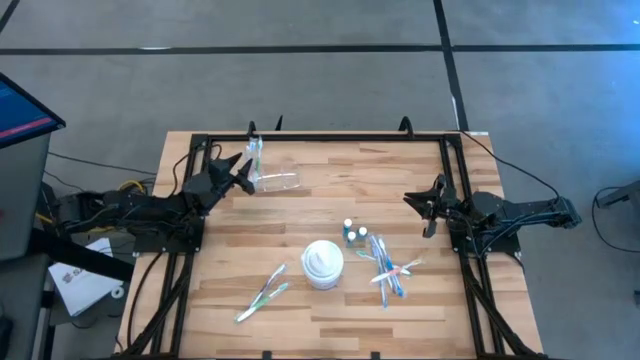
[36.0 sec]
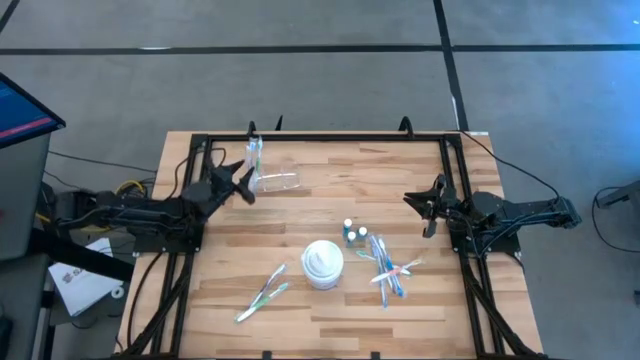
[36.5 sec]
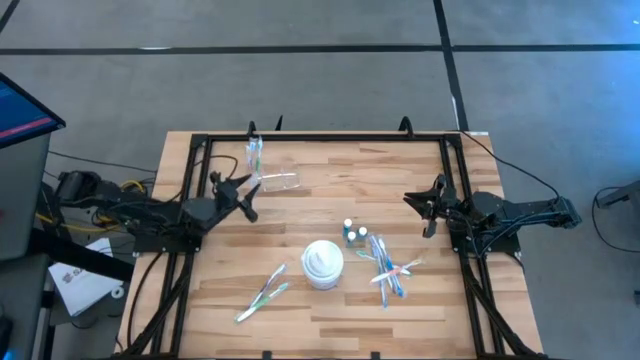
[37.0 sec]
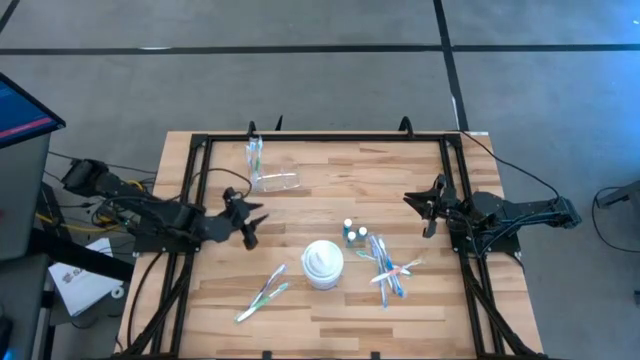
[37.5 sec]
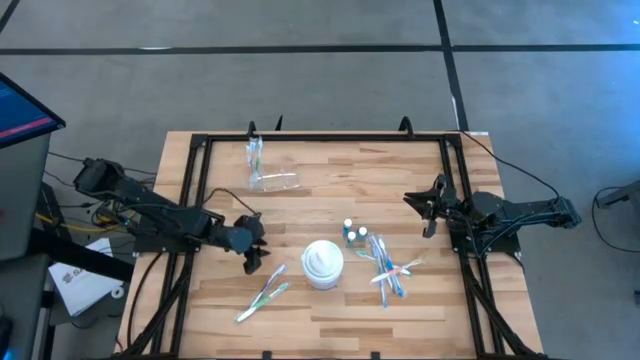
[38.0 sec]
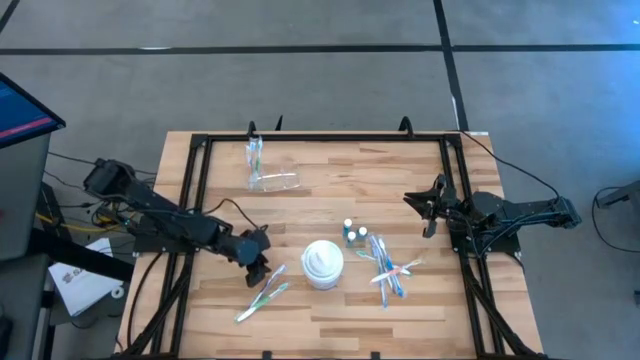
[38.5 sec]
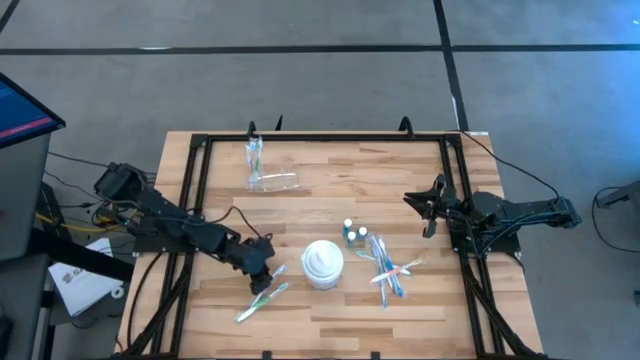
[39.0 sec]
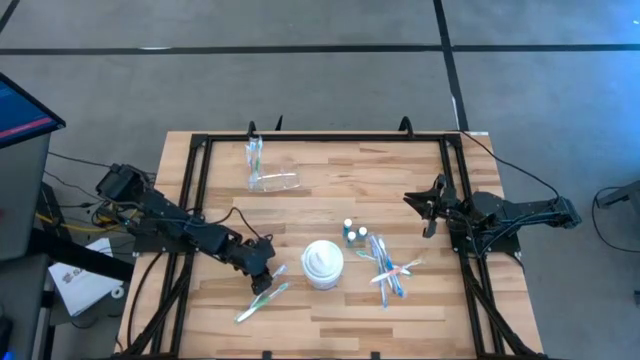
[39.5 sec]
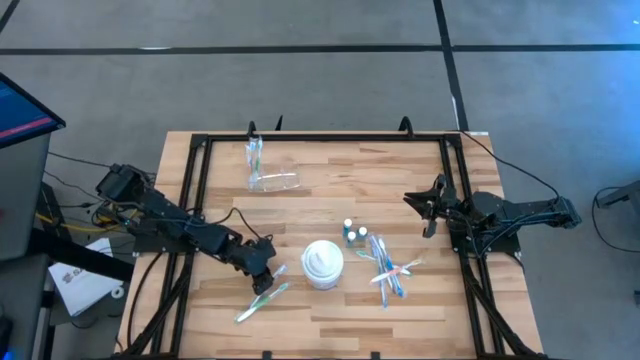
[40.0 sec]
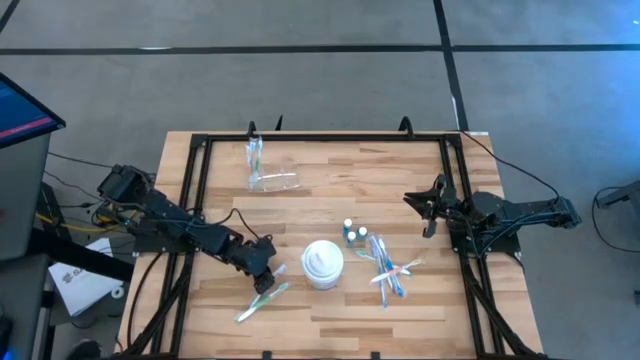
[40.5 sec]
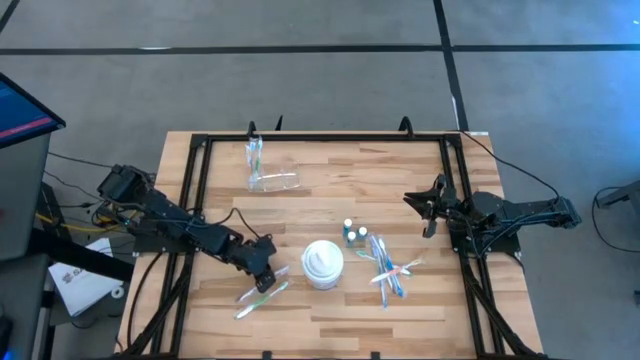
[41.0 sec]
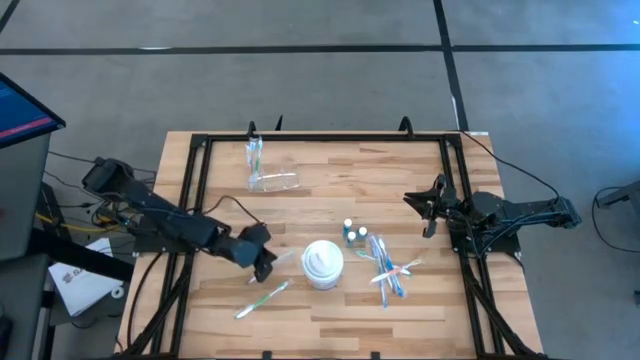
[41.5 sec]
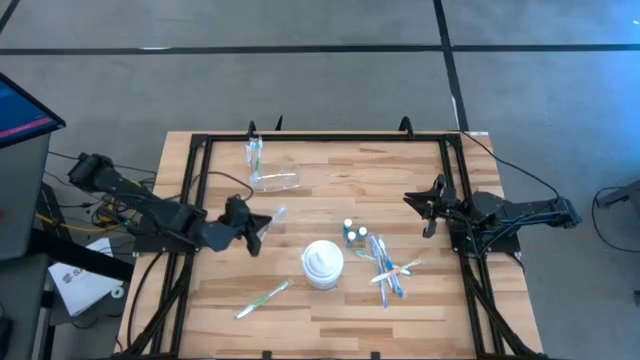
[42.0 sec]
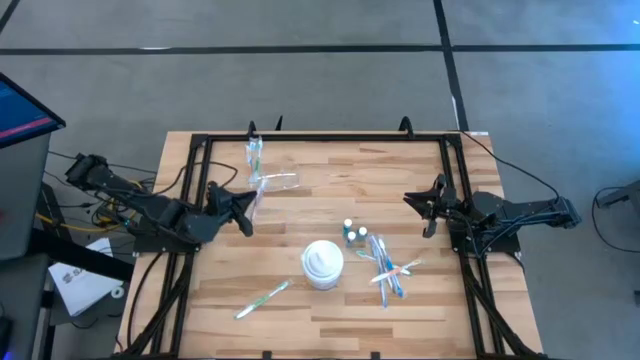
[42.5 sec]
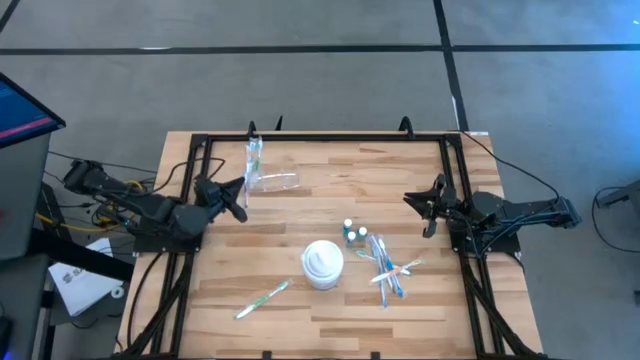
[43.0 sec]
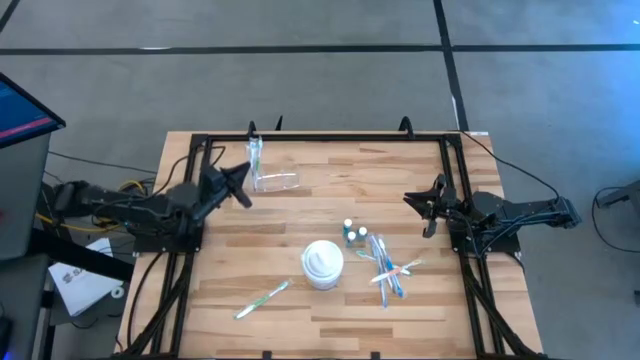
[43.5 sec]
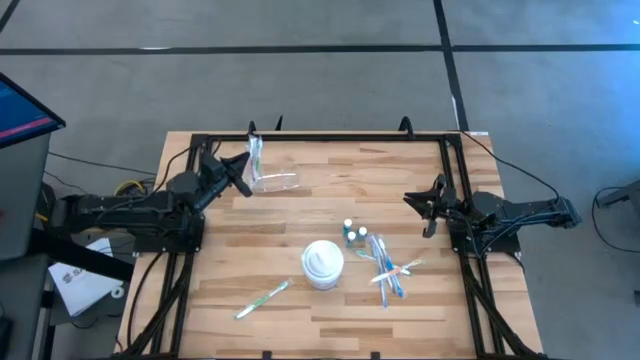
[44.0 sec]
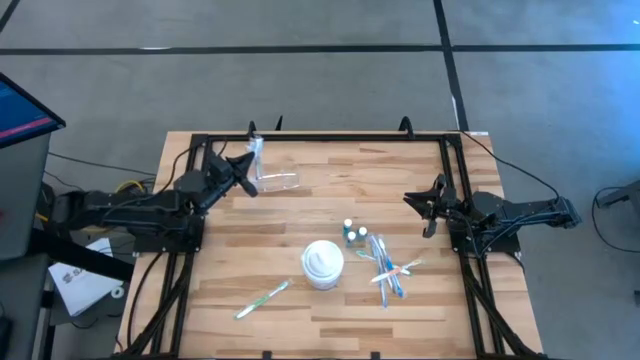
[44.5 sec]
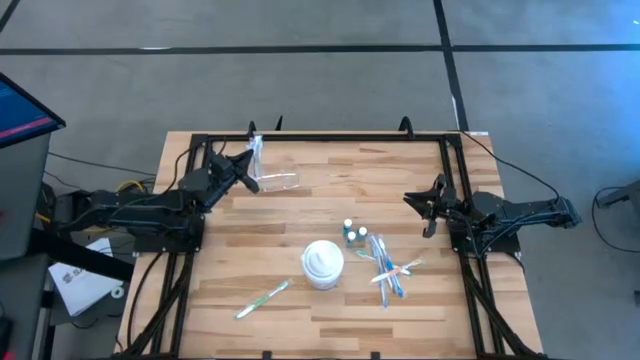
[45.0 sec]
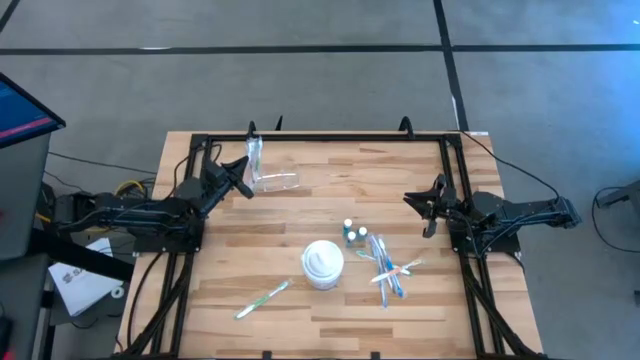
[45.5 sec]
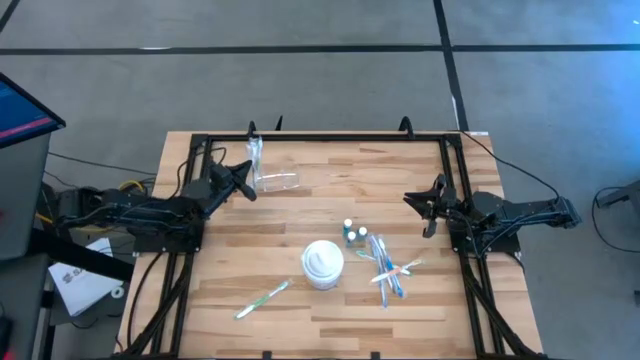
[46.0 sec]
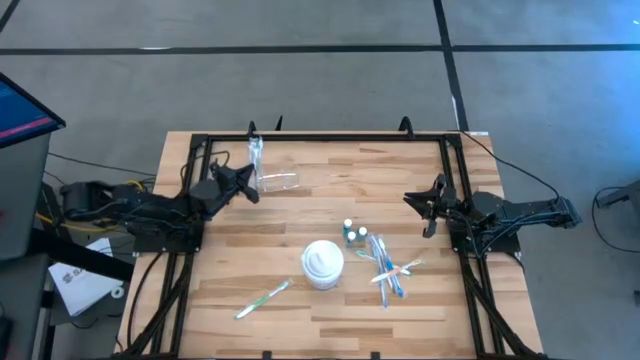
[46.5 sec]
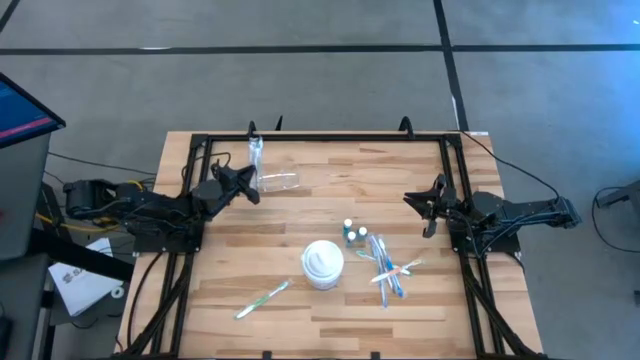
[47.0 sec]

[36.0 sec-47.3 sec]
Task: Pick & Place toothbrushing station
Put the left purple toothbrush into the transparent organizer

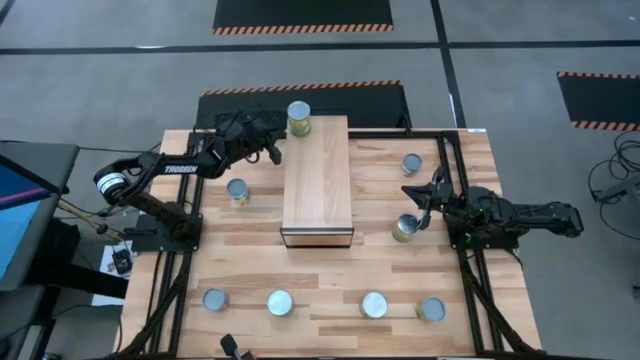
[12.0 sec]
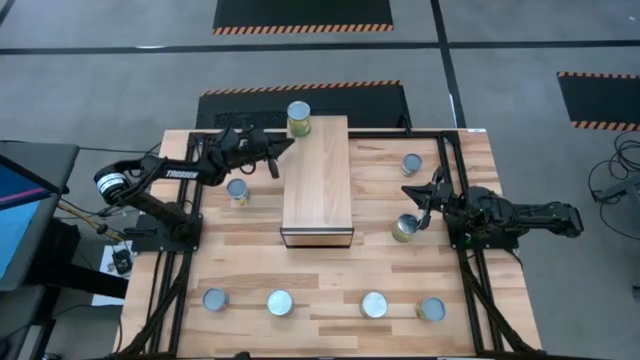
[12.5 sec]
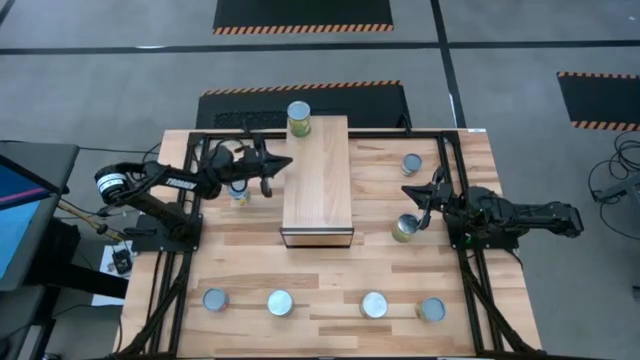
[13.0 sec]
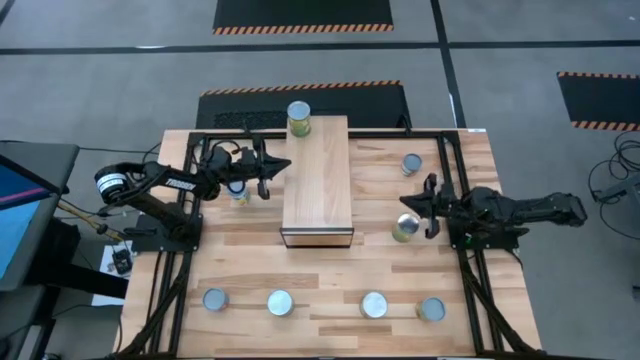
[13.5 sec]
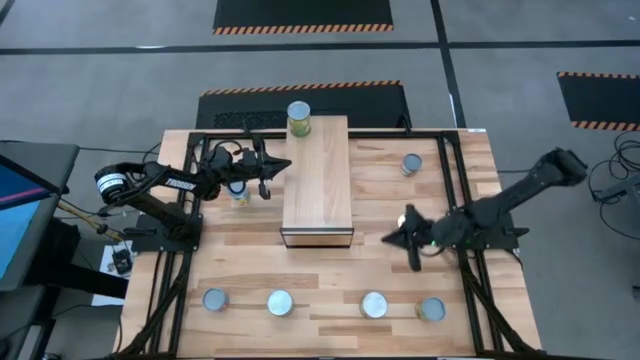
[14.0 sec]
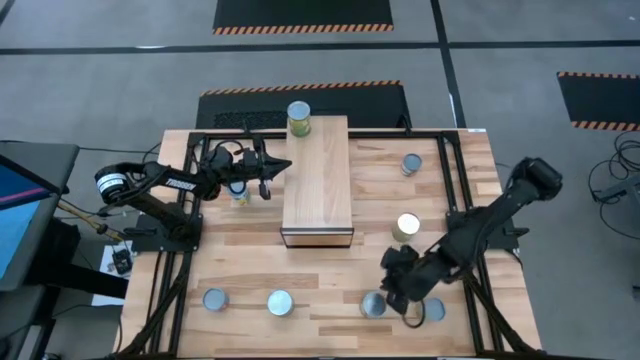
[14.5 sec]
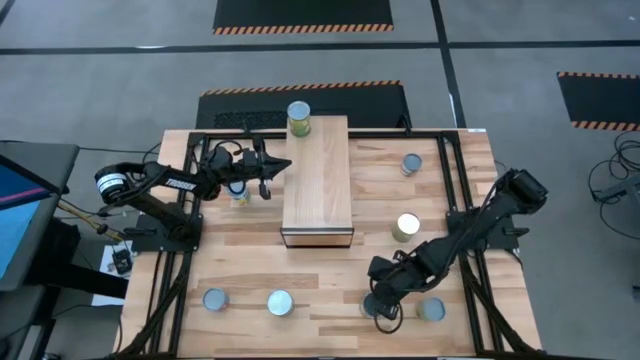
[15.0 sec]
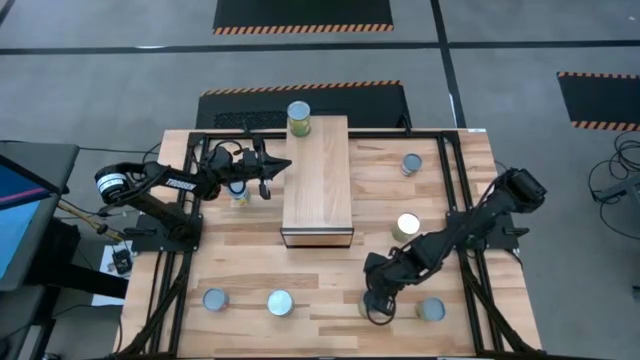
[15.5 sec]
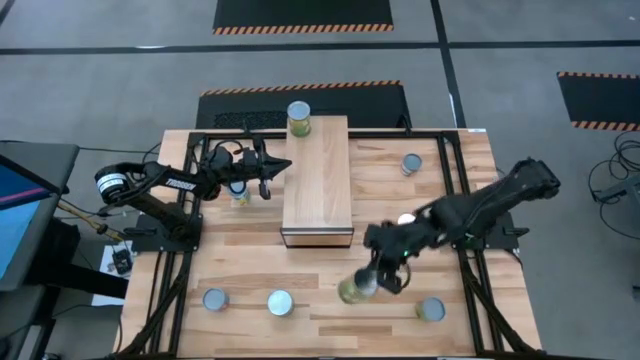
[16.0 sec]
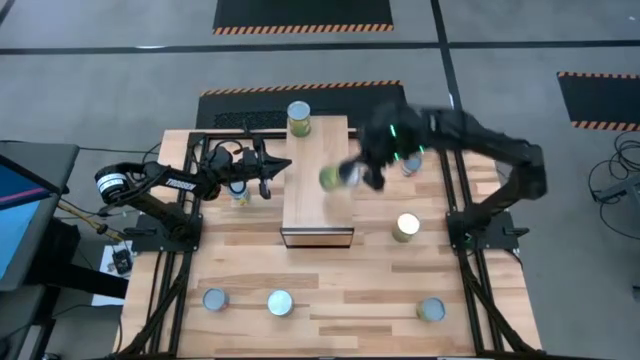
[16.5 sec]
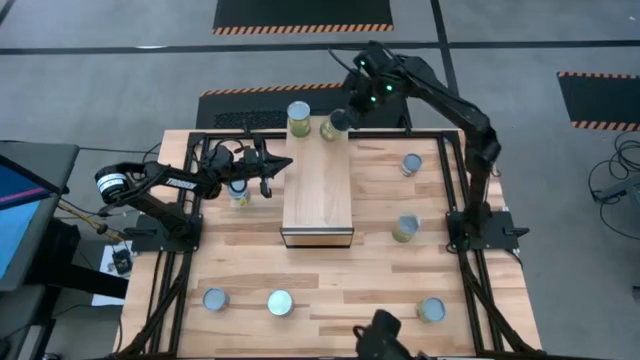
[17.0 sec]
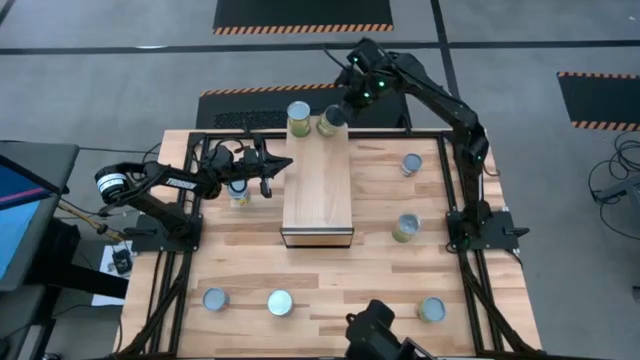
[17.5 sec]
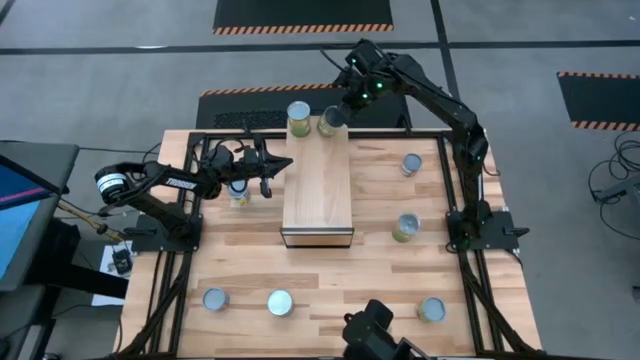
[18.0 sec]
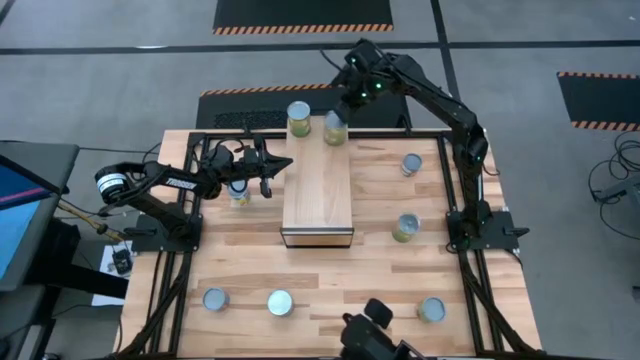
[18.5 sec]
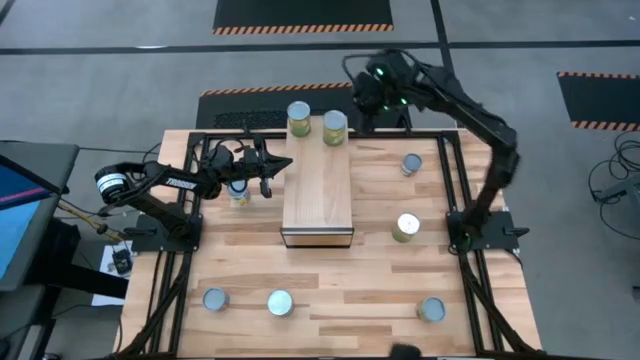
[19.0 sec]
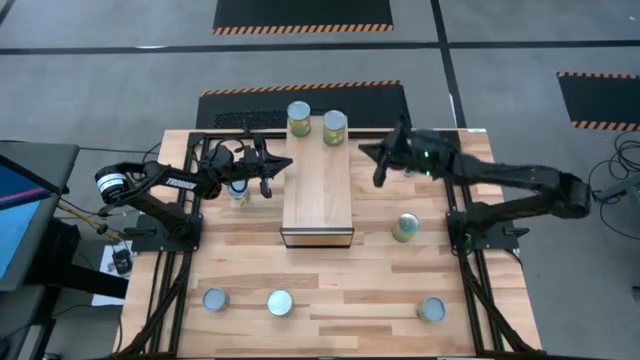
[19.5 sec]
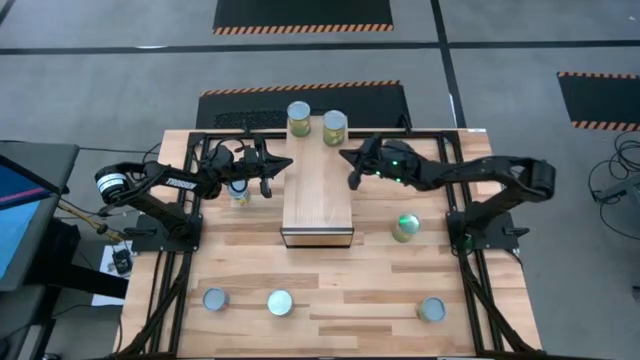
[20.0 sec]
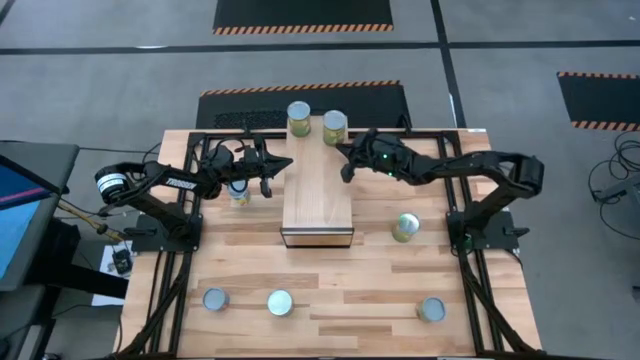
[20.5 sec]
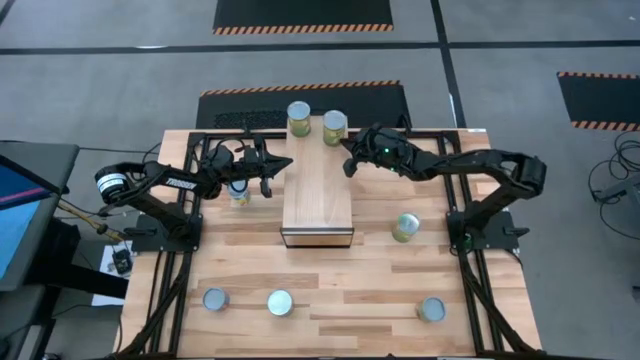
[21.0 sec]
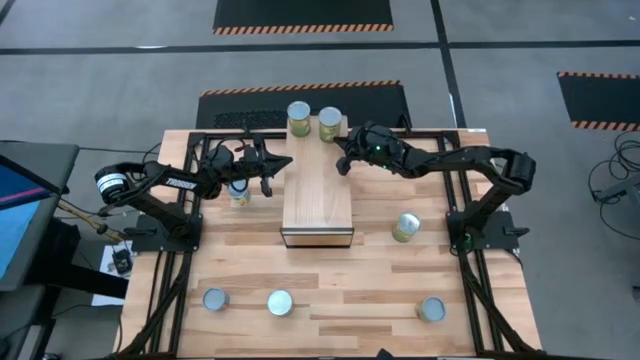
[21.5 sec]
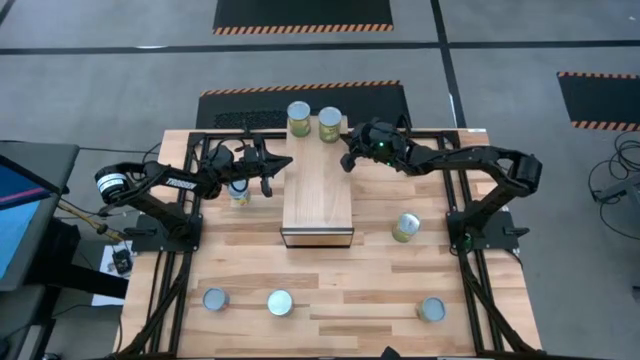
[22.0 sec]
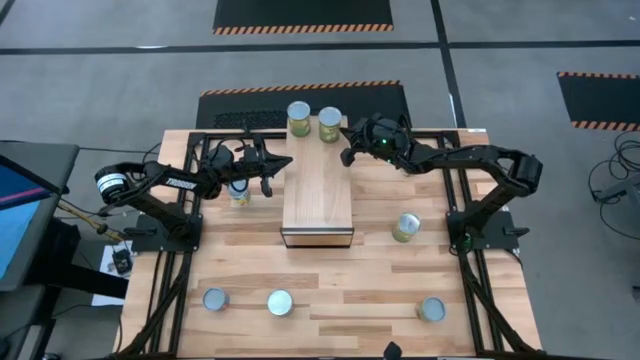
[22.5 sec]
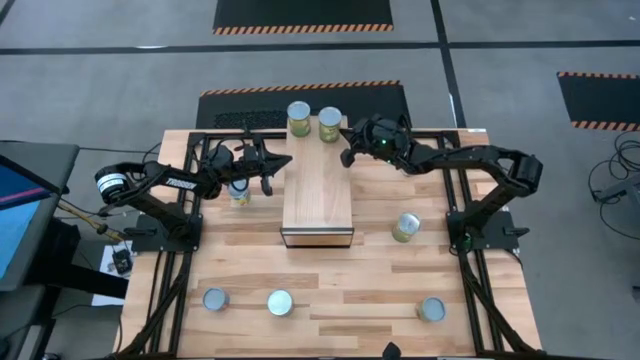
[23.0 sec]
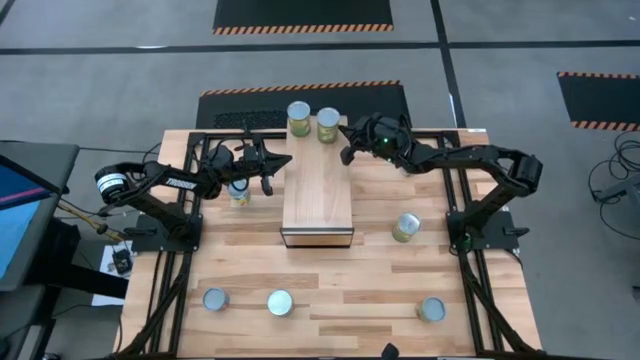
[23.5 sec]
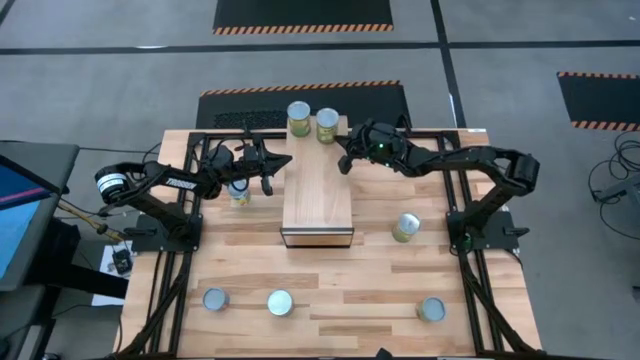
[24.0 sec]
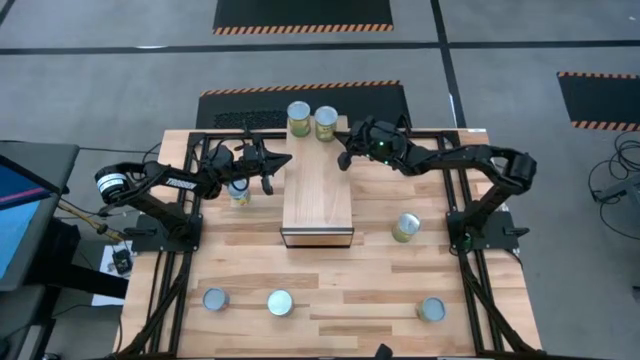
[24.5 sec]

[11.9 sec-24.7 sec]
Task: Pick and place cans onto a shelf
Put the canned pears aligned with the other canned pears on the shelf
